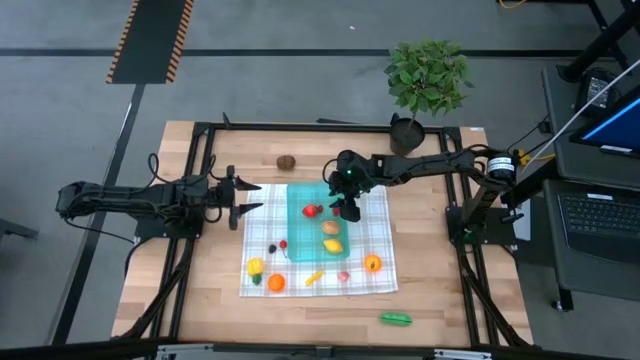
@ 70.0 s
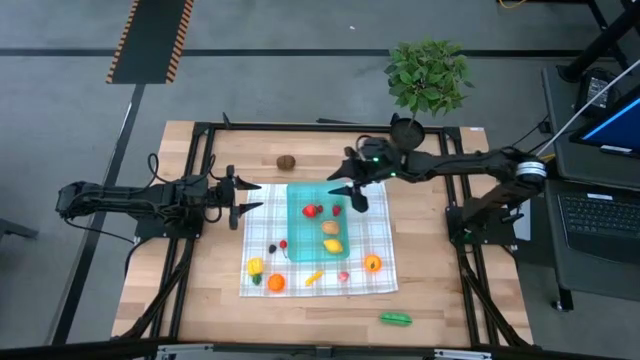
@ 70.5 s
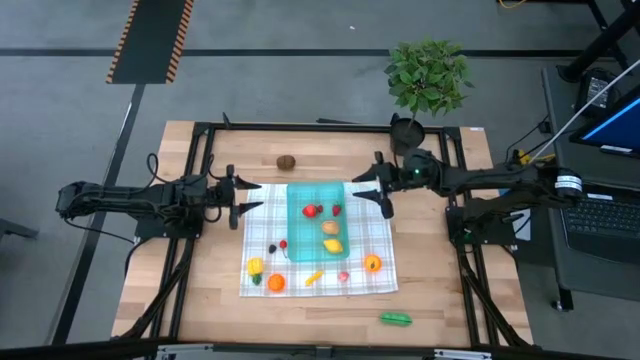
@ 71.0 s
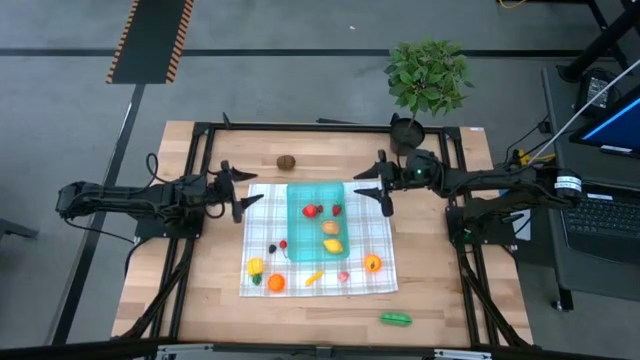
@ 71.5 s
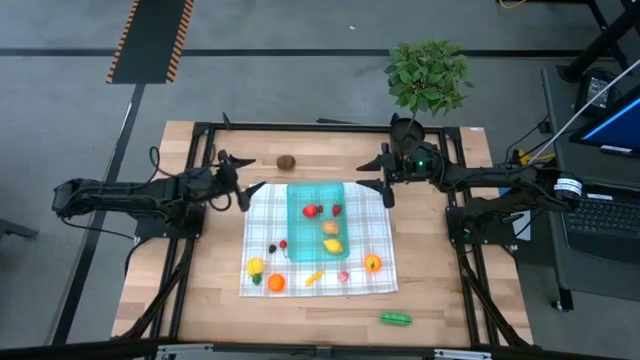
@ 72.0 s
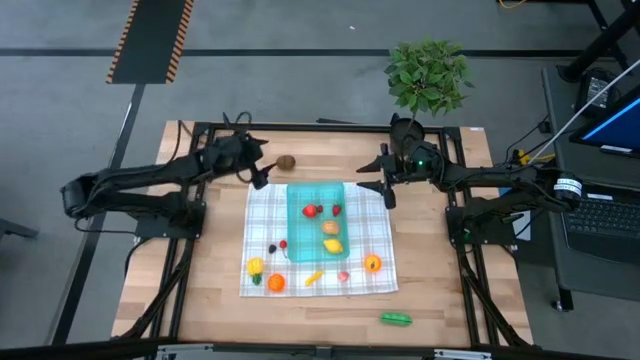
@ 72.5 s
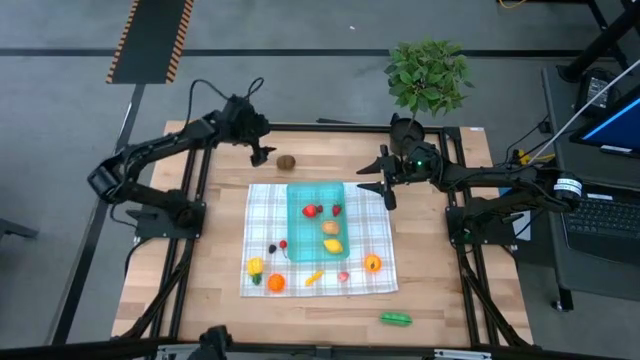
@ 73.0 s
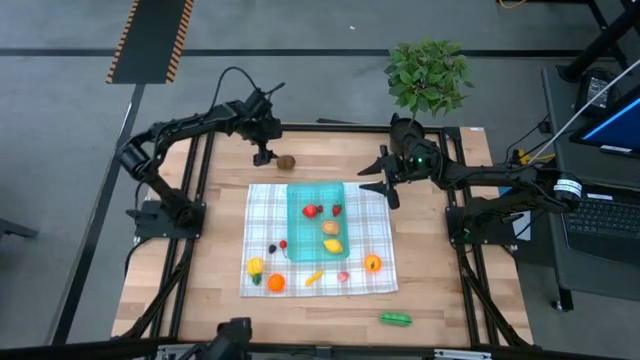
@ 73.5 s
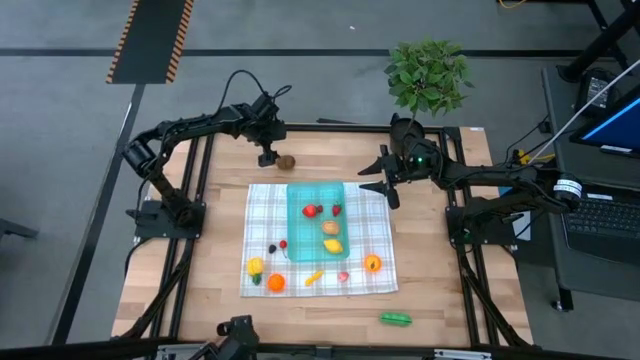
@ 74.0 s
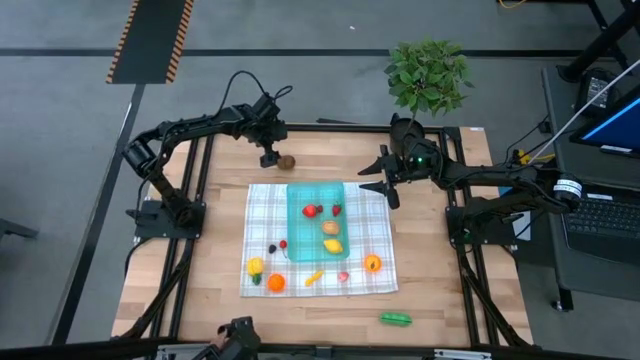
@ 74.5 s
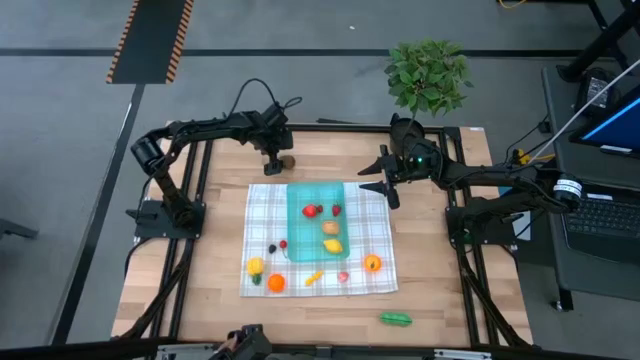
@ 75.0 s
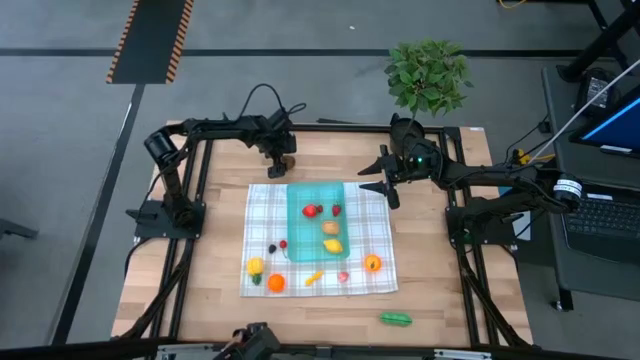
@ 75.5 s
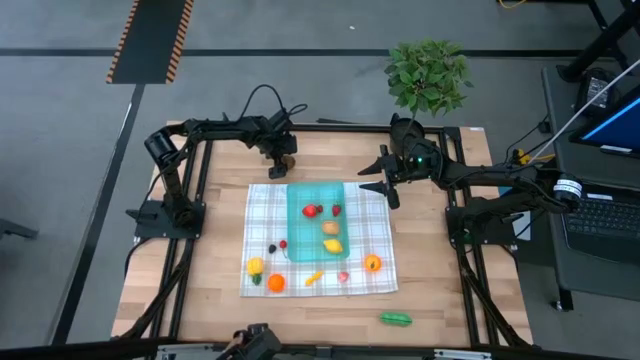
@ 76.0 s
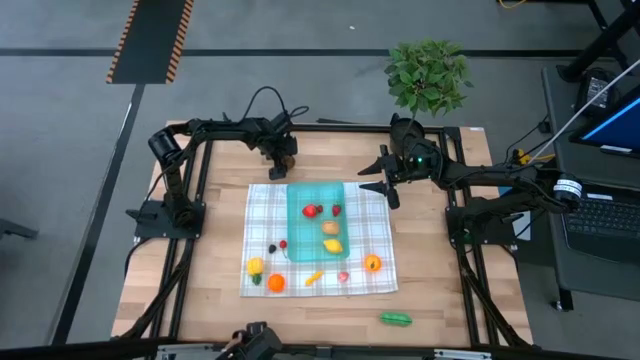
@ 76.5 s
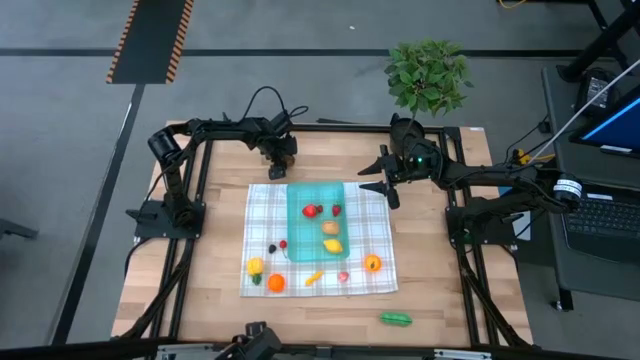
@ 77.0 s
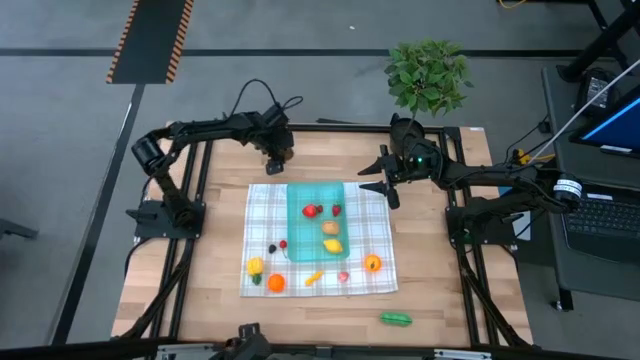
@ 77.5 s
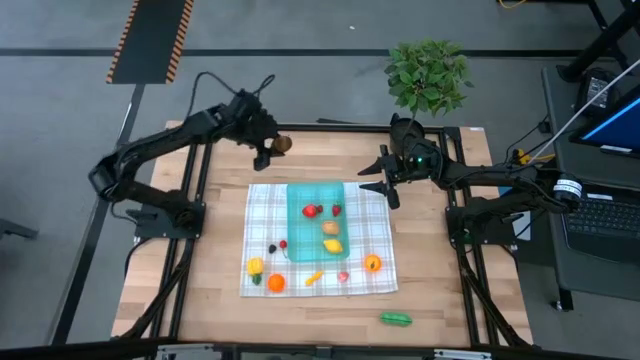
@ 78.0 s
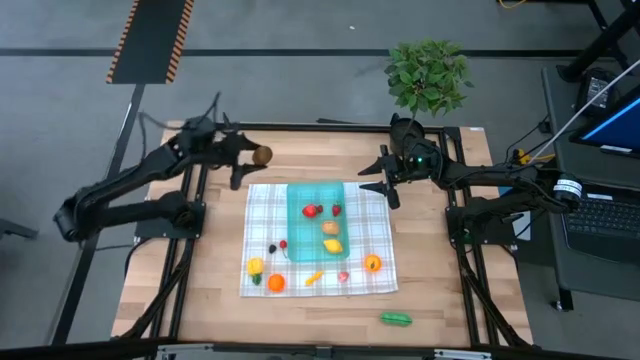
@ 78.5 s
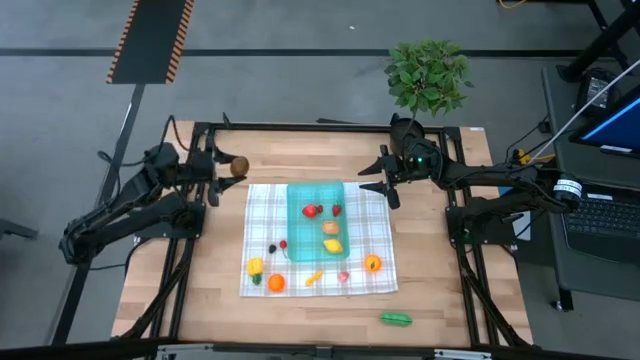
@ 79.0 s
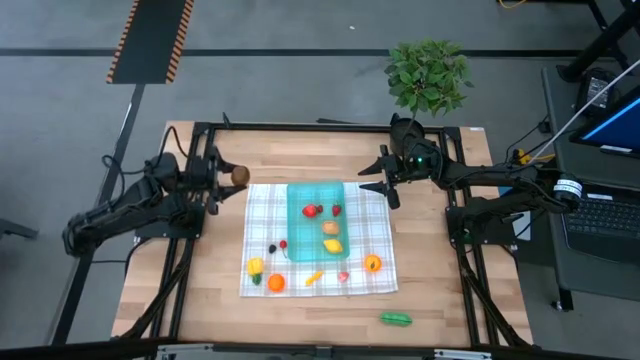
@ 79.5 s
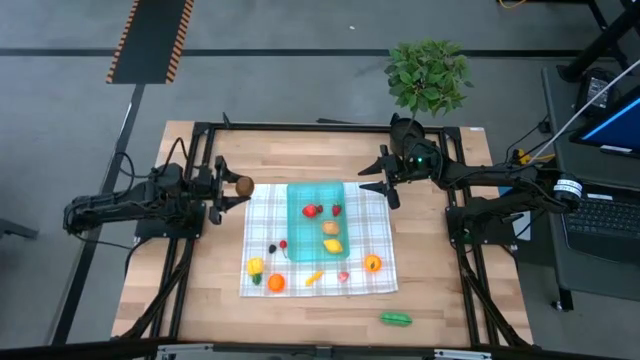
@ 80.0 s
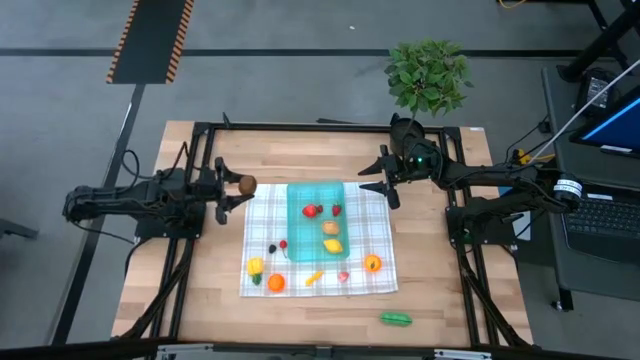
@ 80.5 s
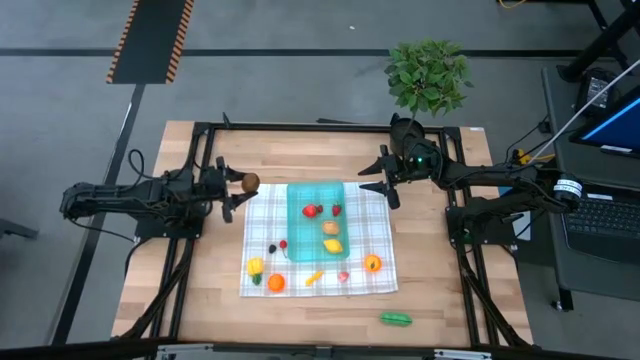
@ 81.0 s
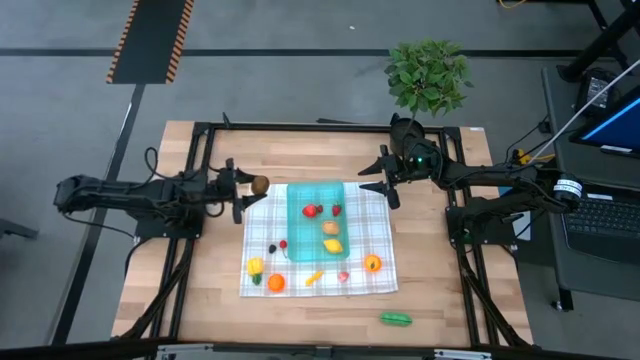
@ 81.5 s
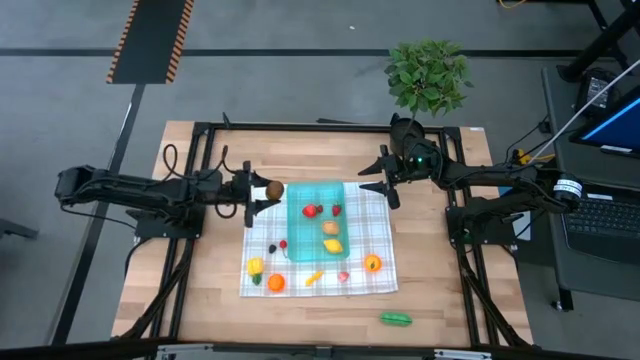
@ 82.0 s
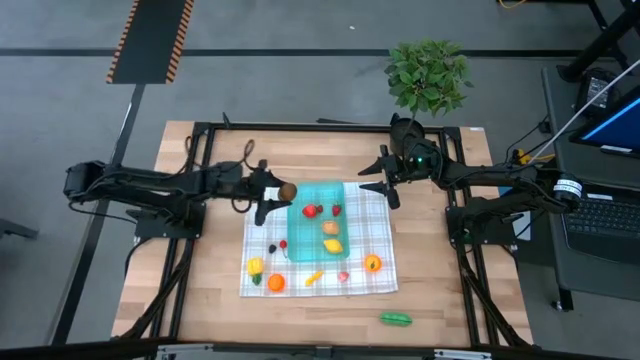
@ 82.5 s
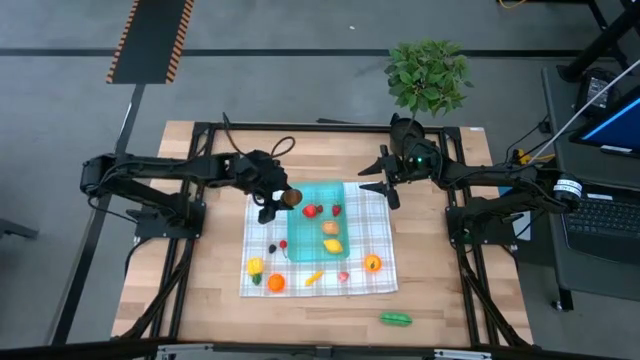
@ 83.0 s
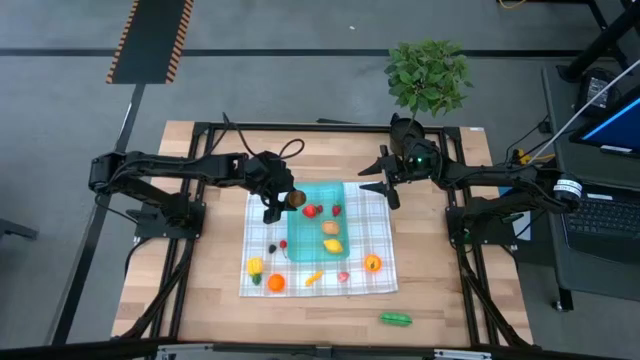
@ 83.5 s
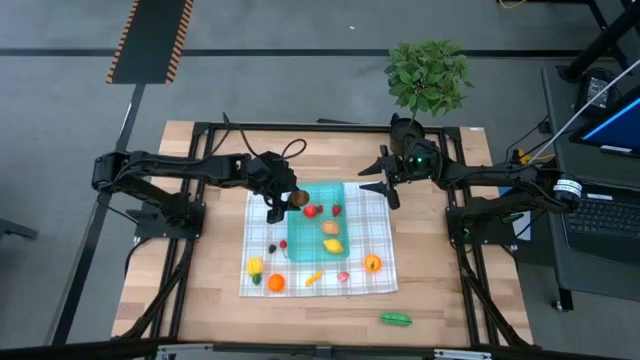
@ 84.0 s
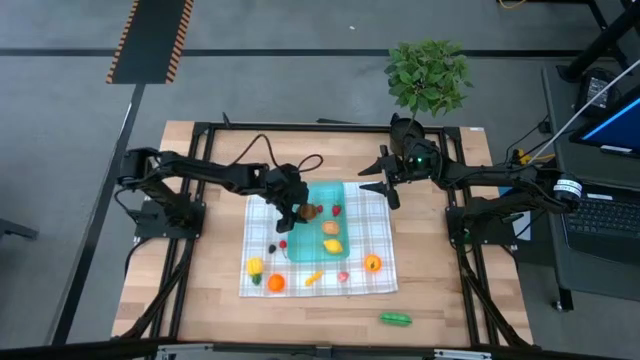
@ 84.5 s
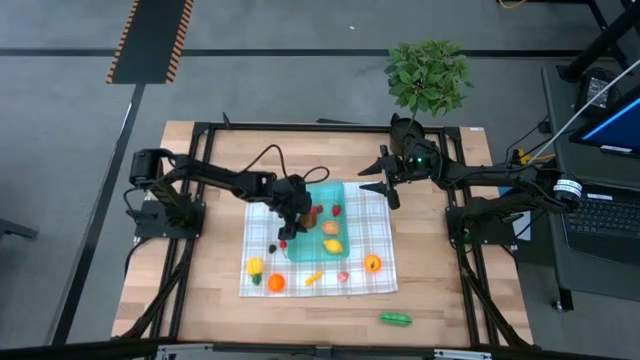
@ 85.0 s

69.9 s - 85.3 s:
Task: Pick and placing Produce into tupperware
Put the kiwi into the blue bin

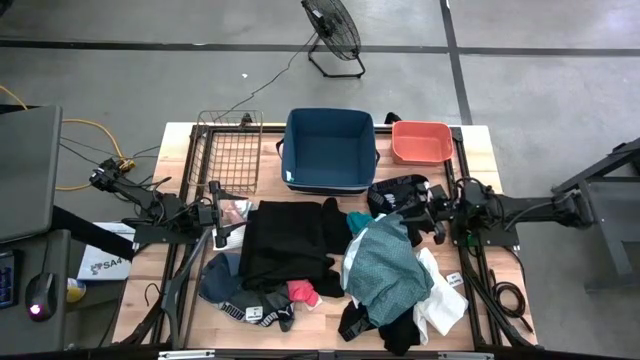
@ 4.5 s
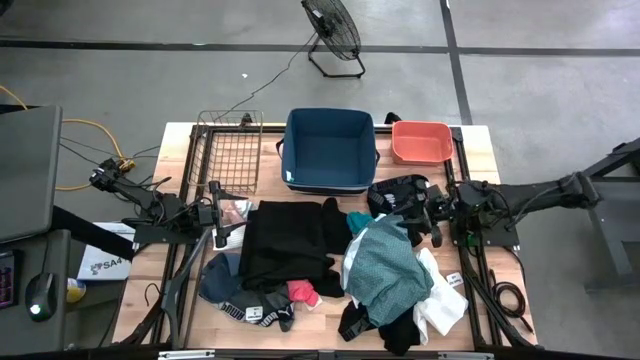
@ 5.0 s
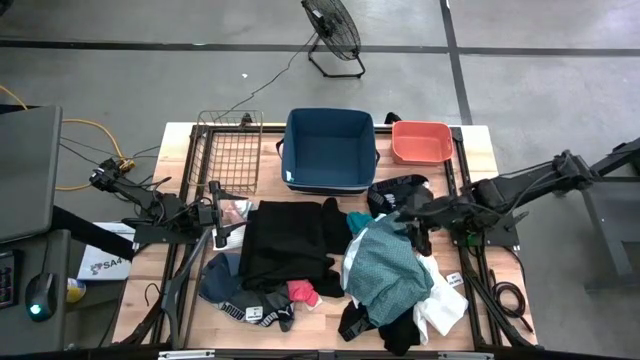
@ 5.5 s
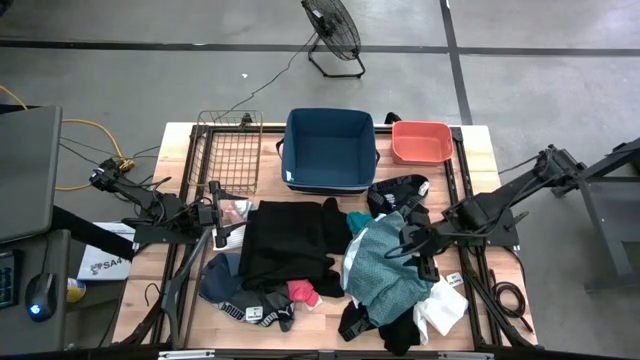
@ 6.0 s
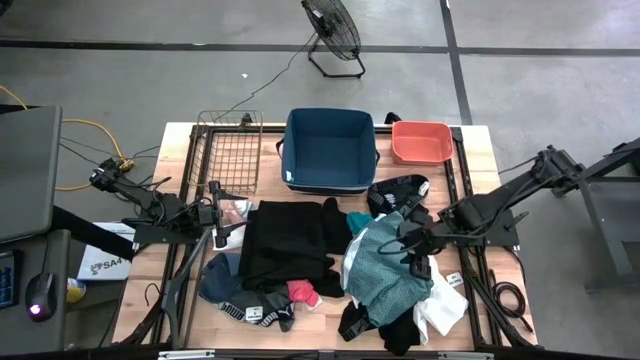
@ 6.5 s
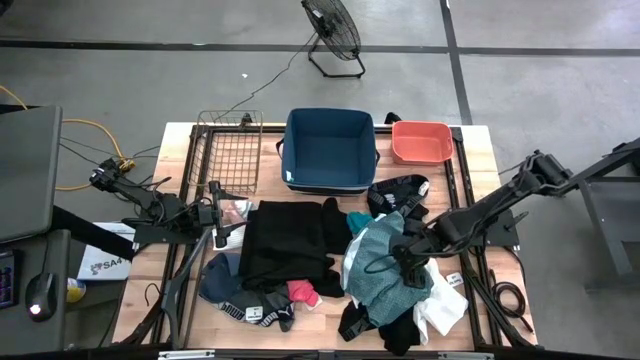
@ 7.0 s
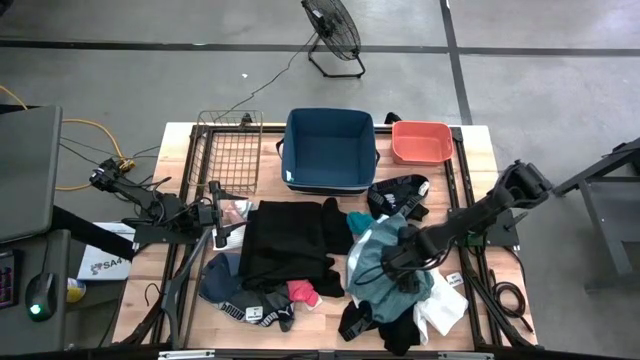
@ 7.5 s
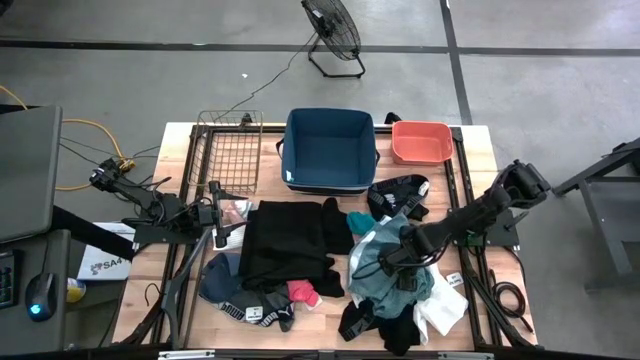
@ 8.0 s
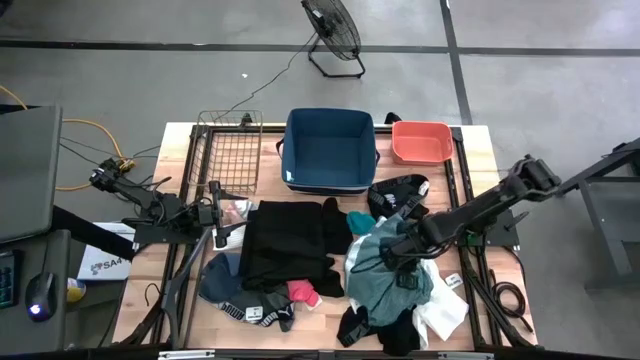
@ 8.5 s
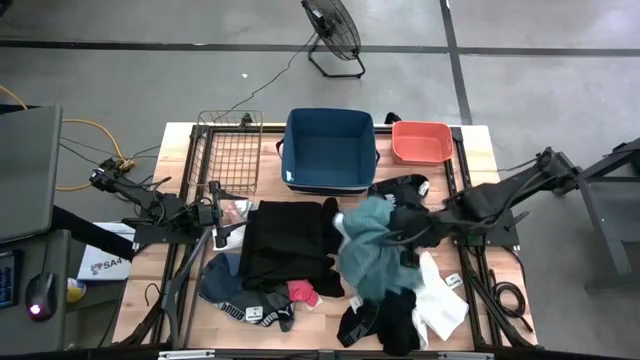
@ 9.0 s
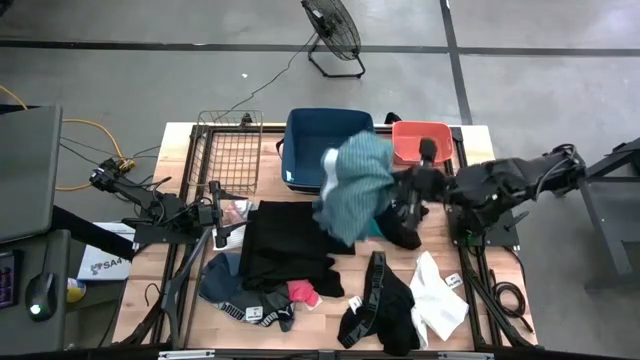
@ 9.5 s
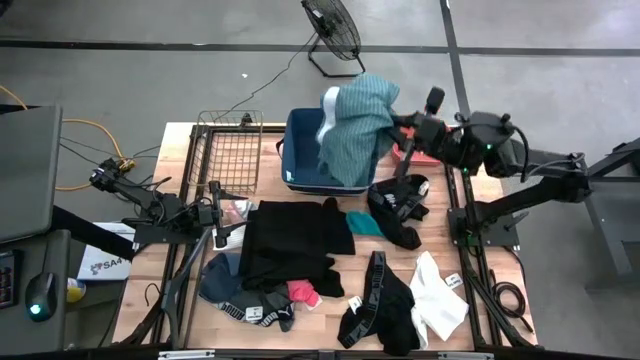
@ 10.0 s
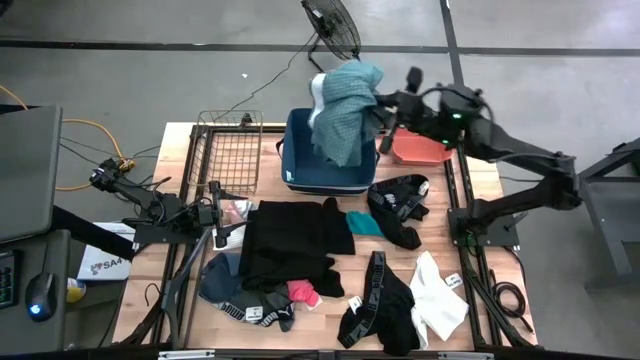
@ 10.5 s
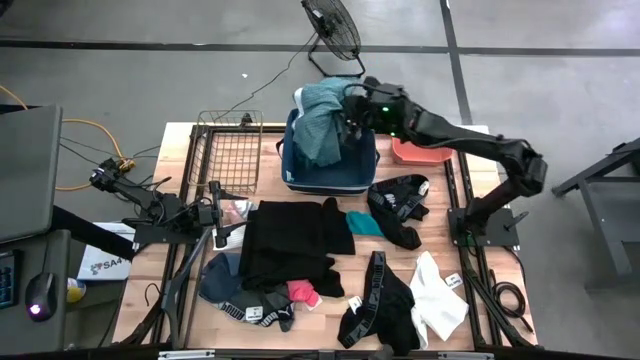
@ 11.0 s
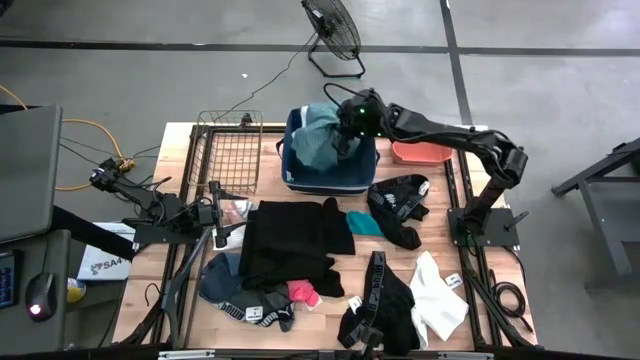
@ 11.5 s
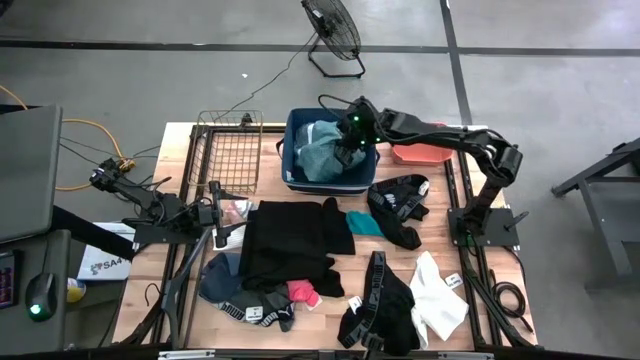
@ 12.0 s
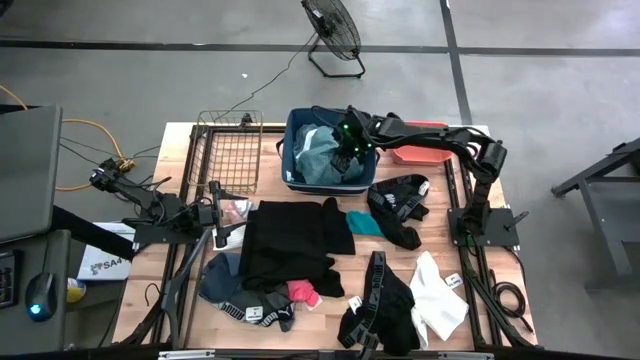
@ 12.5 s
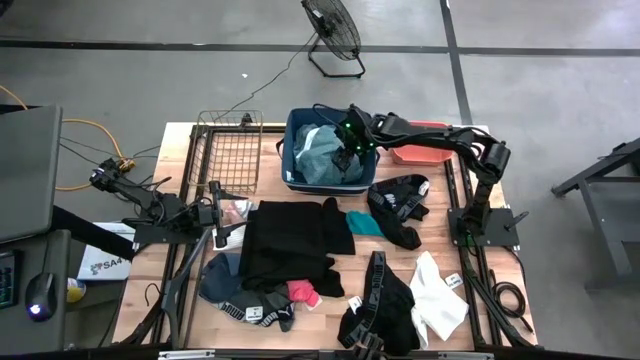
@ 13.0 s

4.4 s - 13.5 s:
Task: Pick & Place Cloths
Put the patient gown into the blue laundry organizer
